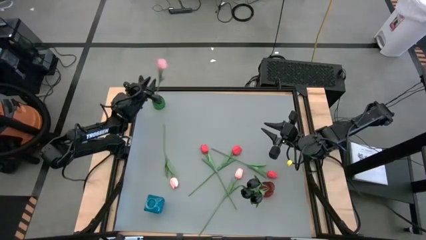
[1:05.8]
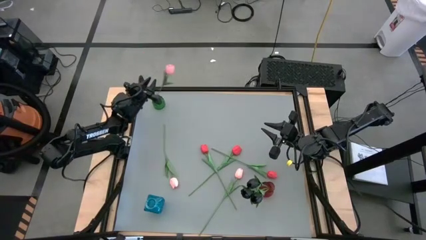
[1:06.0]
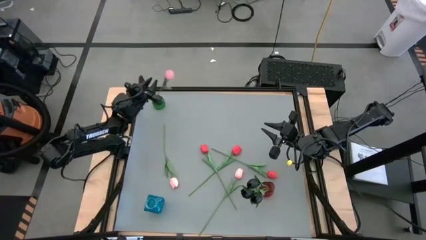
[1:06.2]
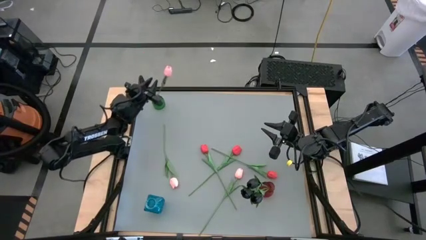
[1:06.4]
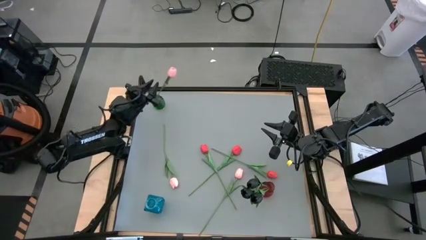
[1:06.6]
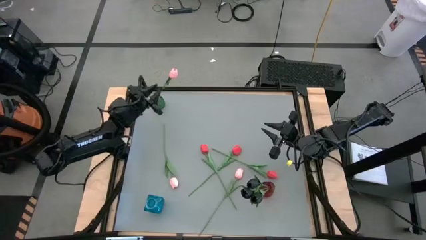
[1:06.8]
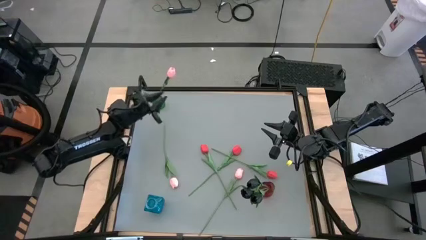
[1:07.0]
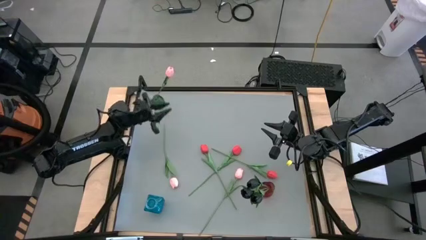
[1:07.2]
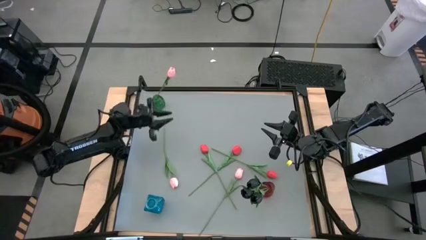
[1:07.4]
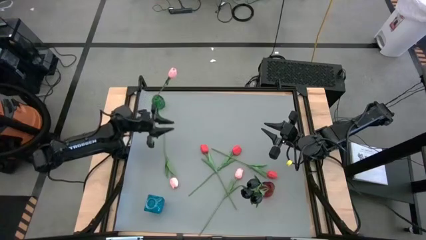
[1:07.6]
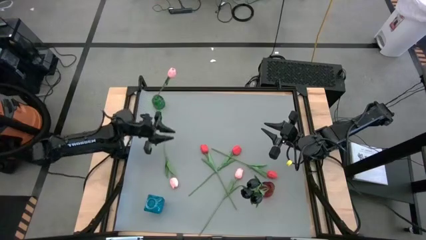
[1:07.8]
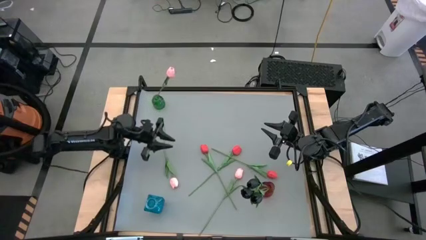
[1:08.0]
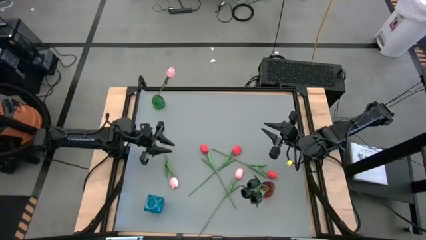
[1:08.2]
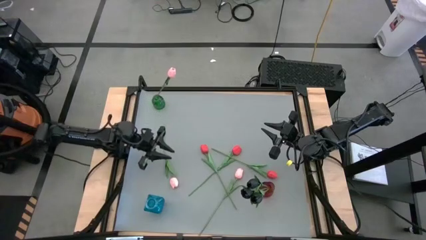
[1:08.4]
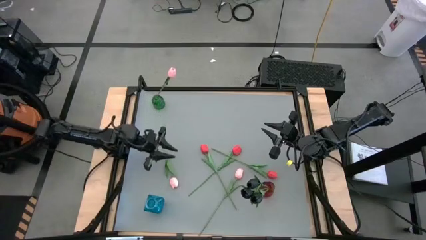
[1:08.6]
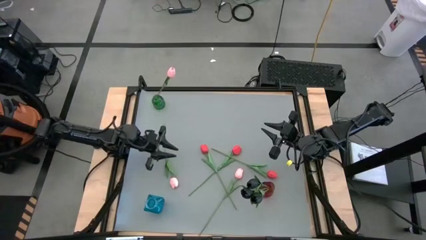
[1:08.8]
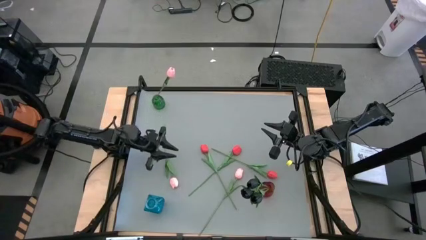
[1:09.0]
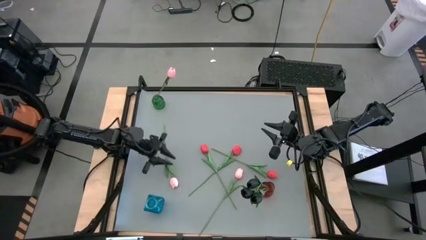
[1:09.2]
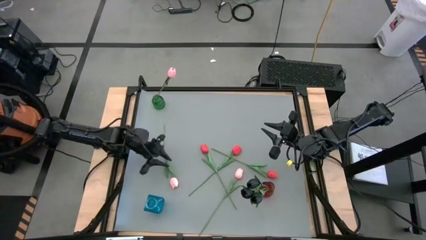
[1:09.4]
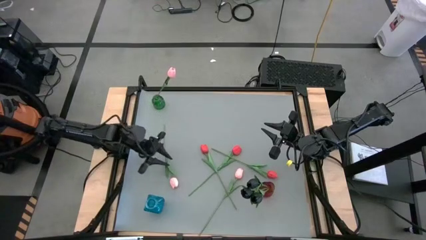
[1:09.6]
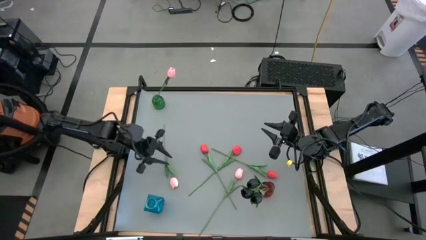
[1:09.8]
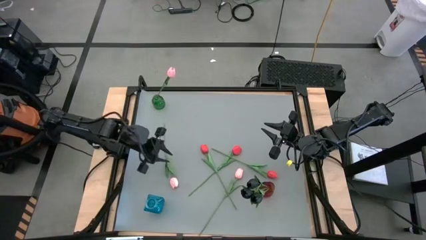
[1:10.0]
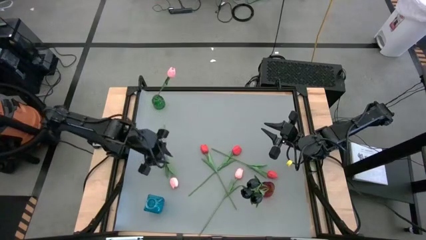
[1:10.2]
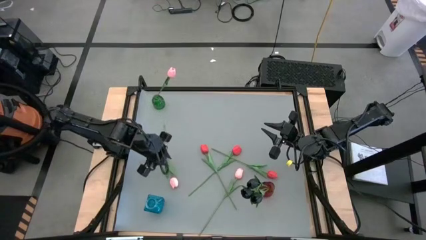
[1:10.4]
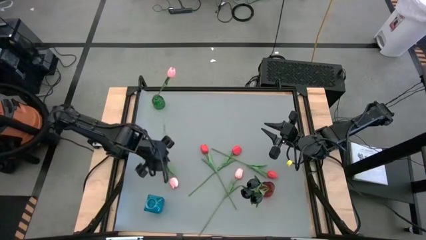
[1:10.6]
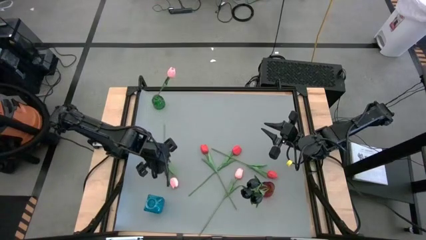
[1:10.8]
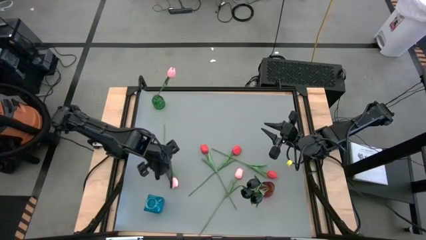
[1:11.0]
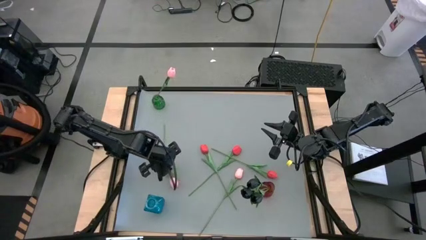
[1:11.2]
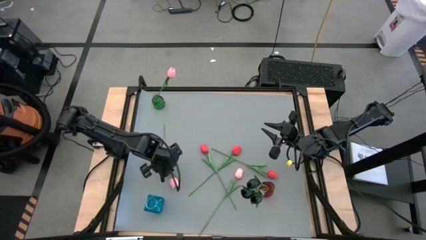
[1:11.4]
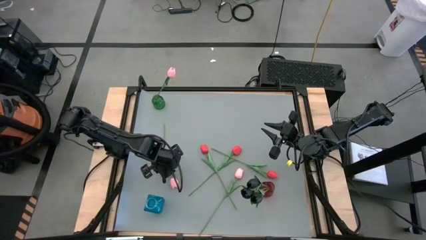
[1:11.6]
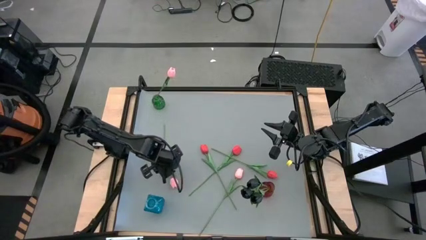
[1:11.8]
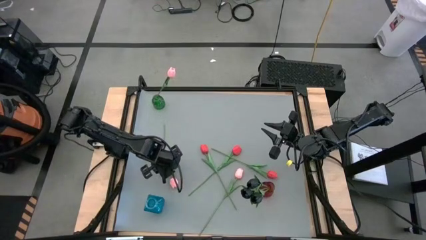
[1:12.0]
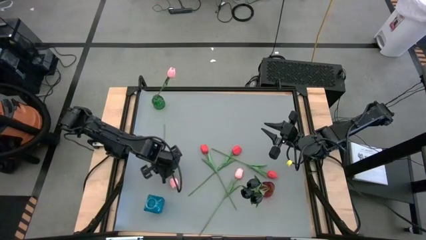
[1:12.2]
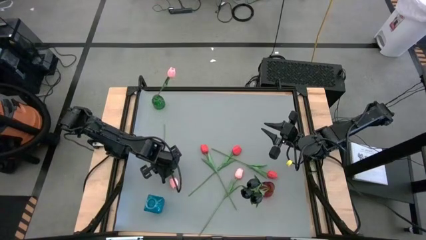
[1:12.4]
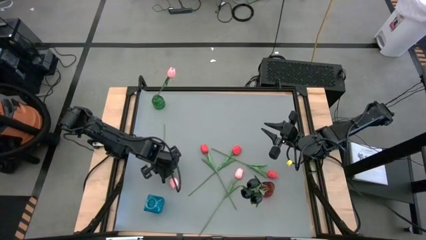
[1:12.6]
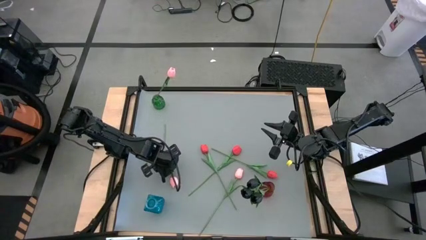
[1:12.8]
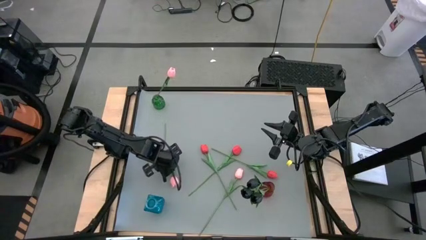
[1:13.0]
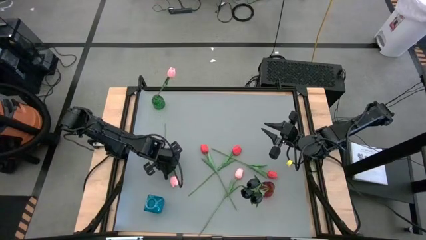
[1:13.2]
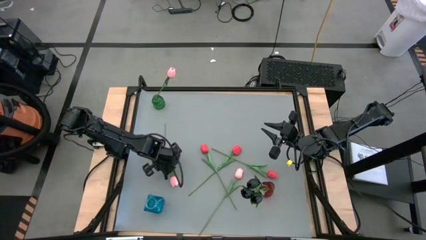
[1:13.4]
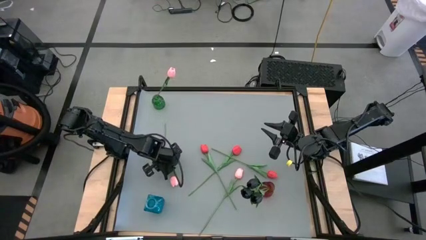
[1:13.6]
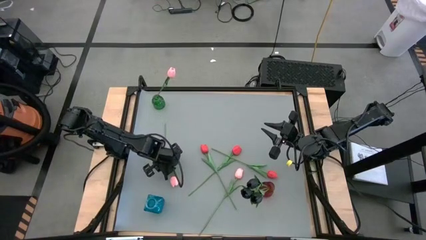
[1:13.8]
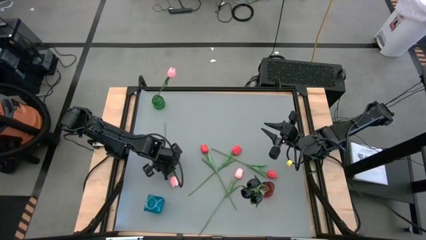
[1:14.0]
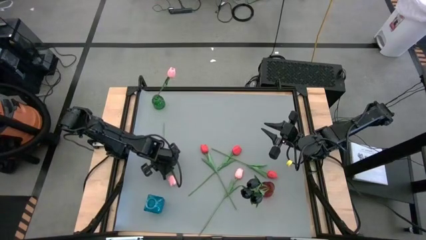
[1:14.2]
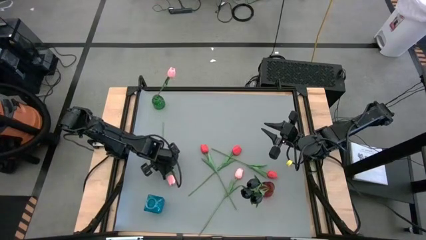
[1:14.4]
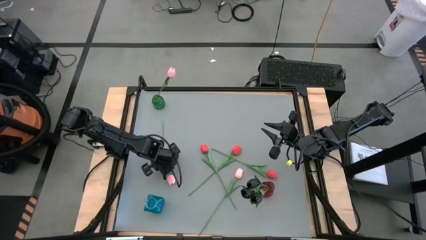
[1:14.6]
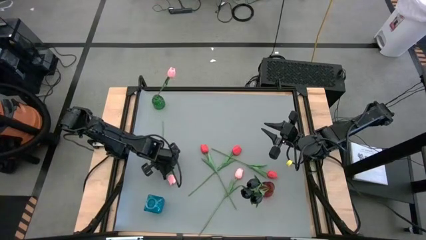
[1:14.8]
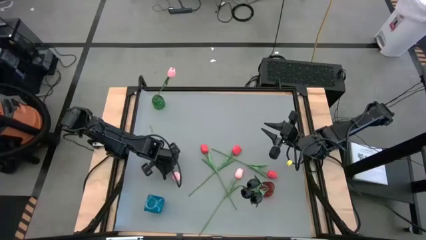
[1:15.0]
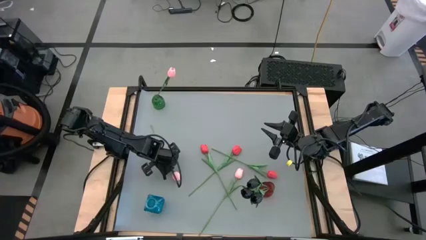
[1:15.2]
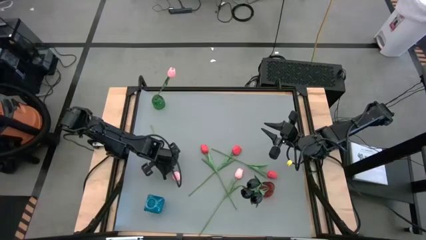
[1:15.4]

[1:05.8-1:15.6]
Task: Sort flowers into vase by color
Put the left pink flower into the green vase

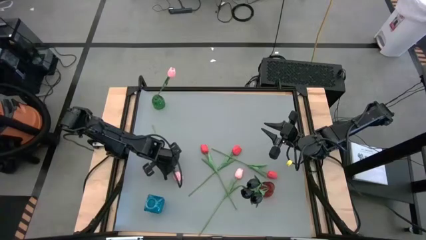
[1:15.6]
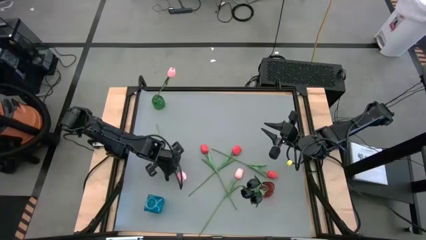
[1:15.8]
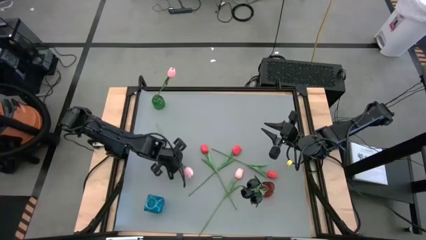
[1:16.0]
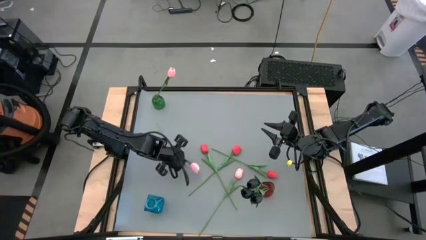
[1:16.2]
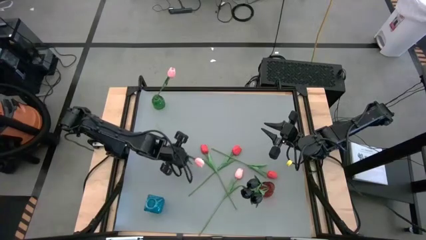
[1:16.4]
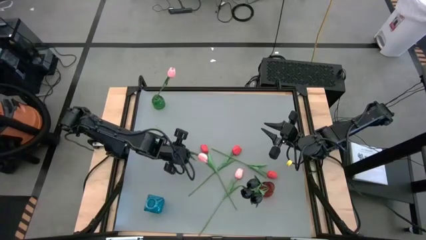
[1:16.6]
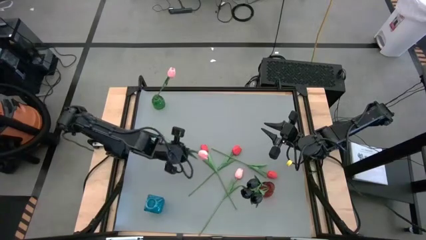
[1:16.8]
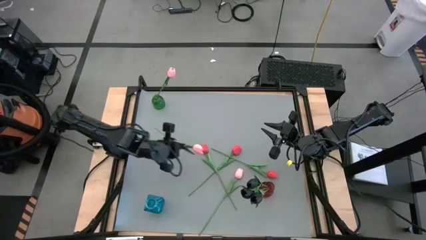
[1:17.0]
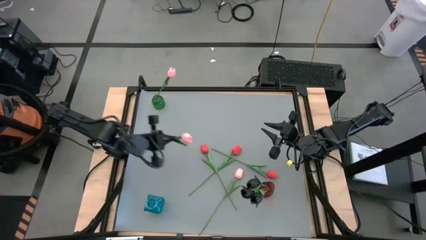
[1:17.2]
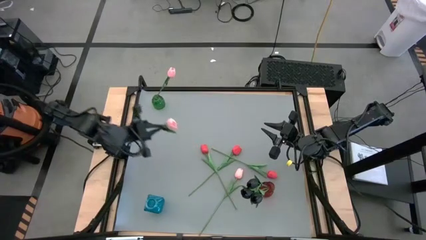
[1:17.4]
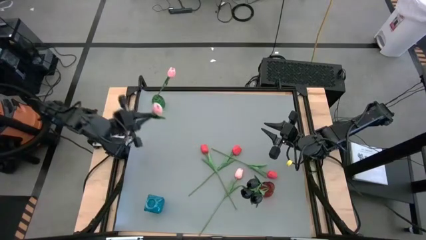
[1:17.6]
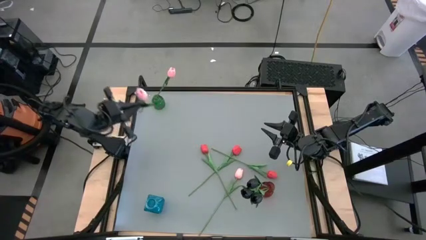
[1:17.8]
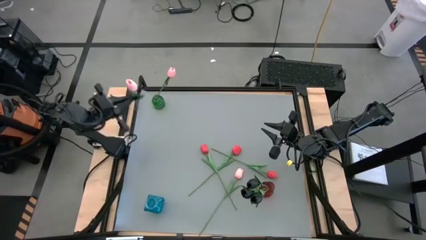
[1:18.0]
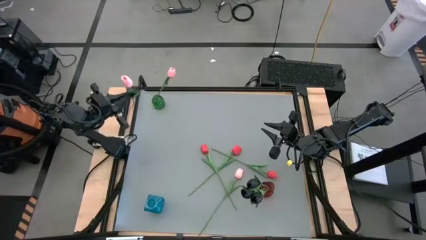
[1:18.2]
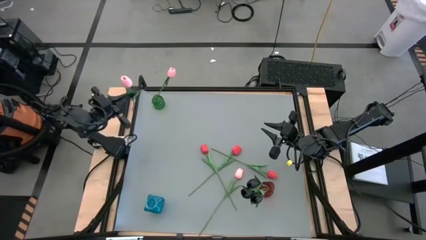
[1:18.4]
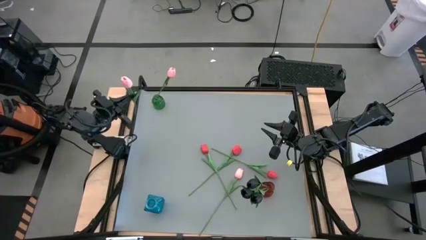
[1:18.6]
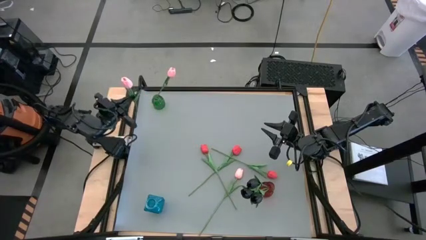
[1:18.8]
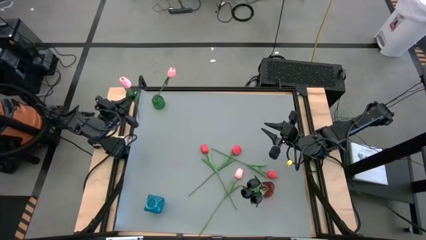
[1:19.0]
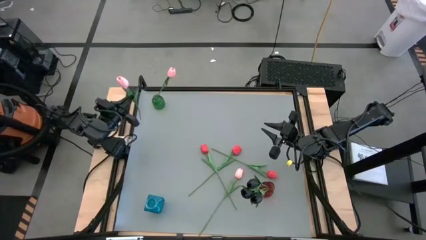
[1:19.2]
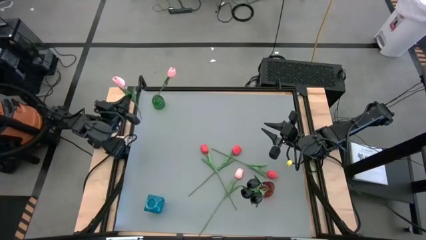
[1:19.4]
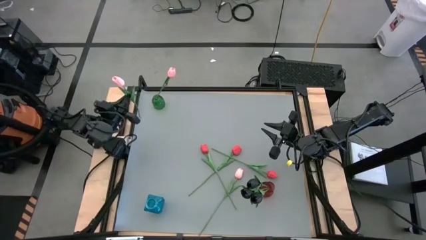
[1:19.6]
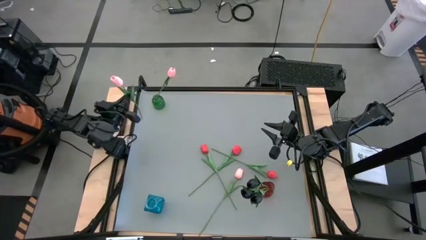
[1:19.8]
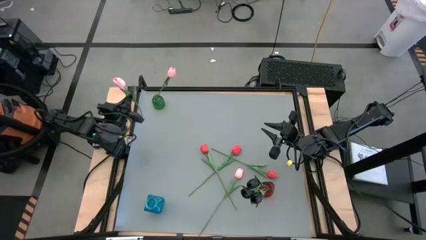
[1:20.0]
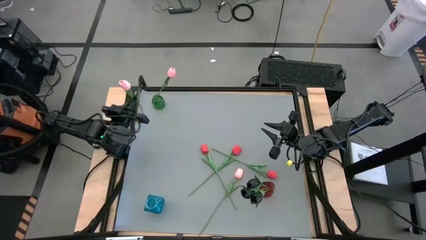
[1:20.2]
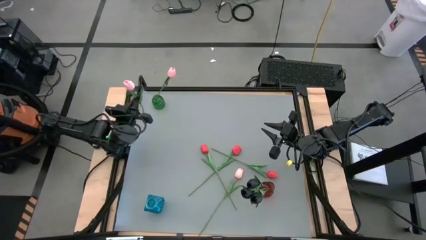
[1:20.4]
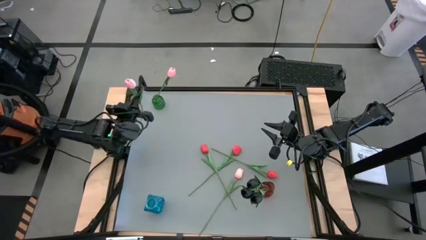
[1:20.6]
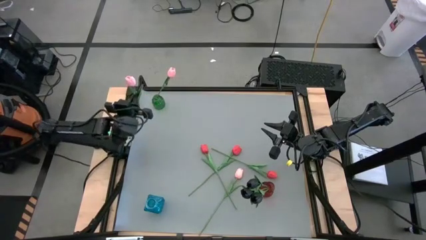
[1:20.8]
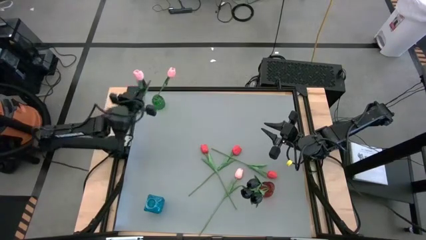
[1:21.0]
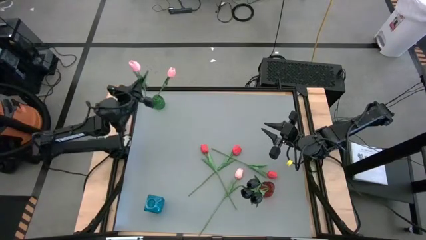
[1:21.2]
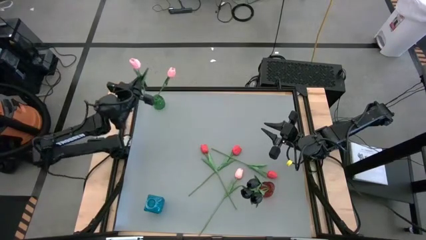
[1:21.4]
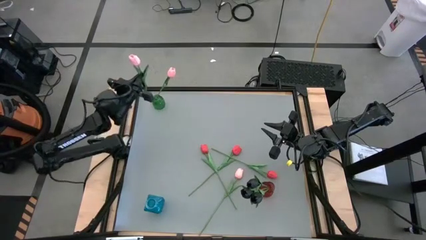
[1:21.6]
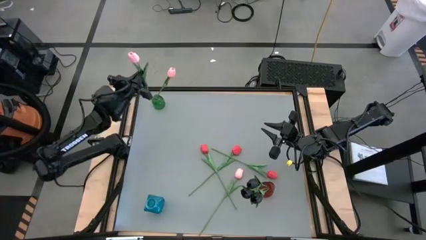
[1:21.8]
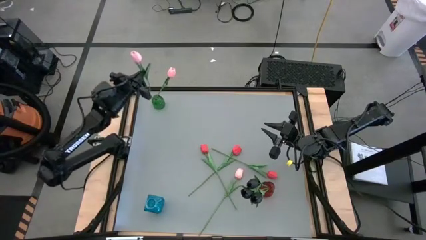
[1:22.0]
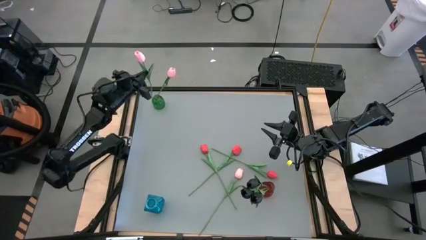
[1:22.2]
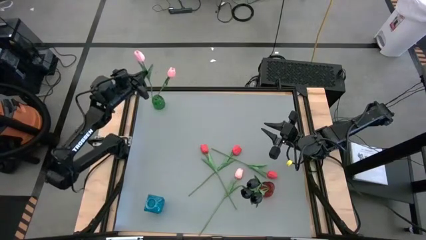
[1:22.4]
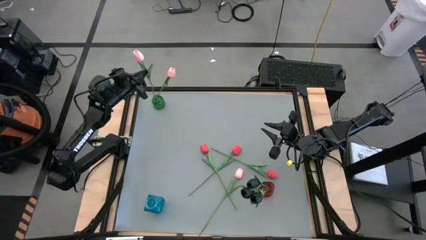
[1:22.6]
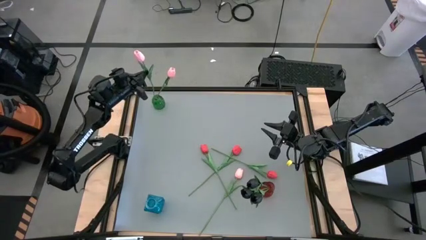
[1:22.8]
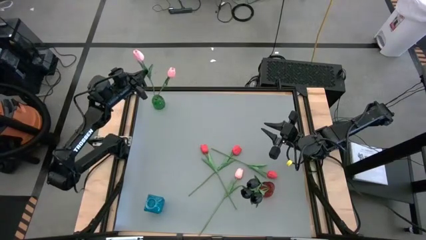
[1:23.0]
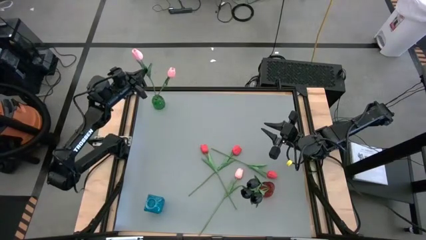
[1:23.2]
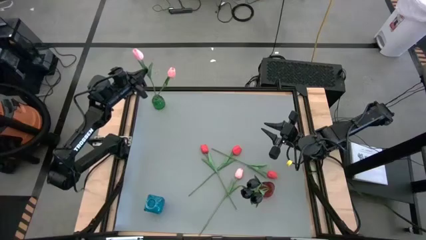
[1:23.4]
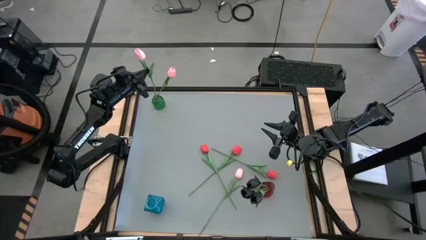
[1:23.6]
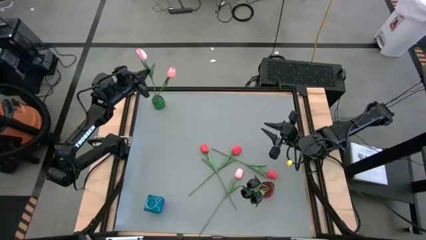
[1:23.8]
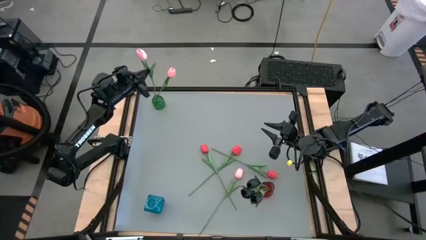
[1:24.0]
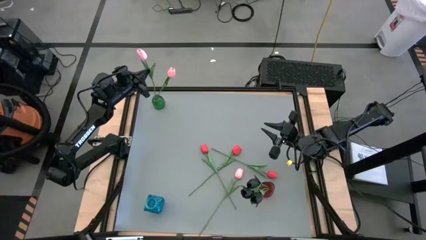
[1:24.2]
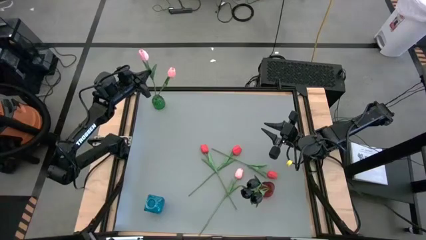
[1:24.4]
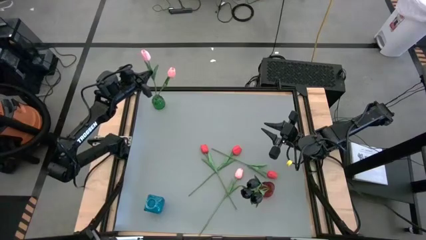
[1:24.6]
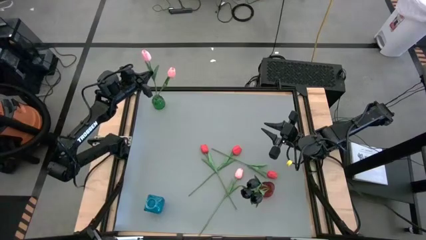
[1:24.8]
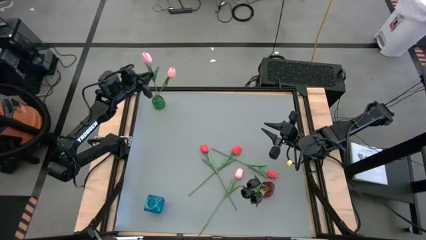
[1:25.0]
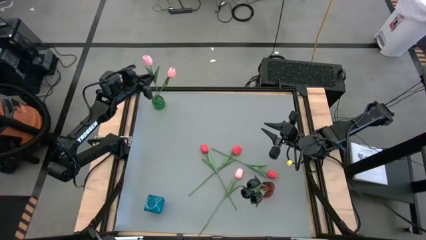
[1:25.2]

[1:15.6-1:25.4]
Put the left pink flower into the green vase
